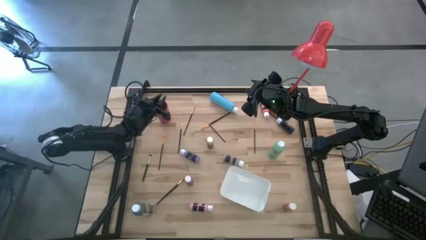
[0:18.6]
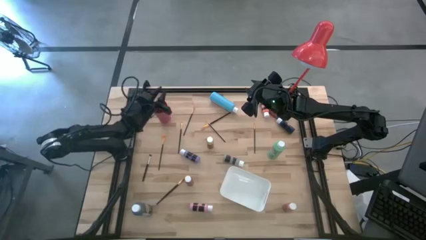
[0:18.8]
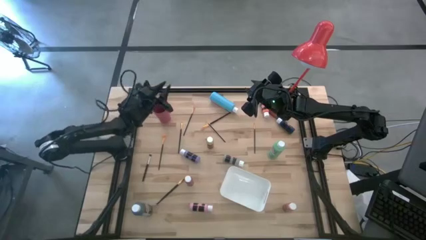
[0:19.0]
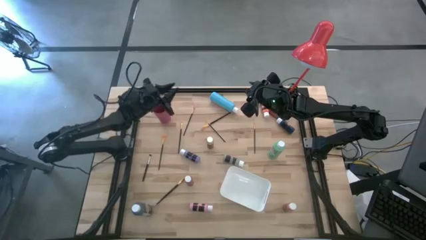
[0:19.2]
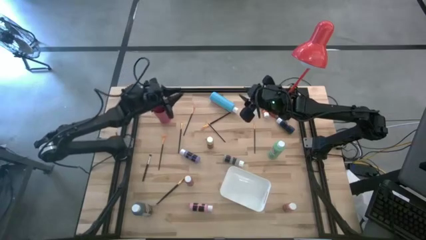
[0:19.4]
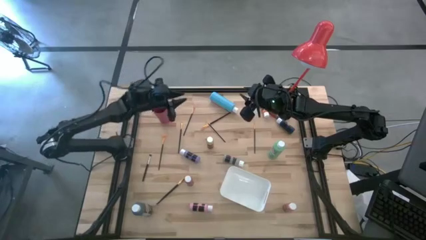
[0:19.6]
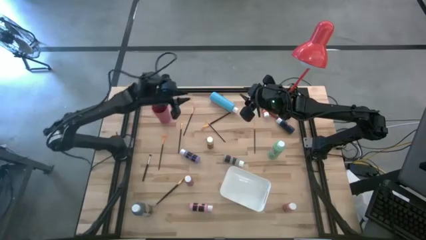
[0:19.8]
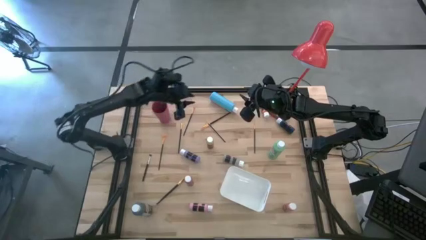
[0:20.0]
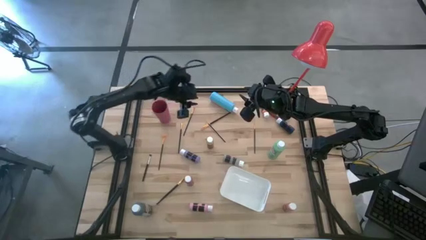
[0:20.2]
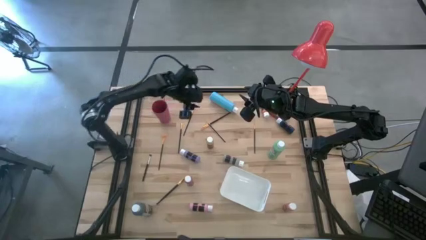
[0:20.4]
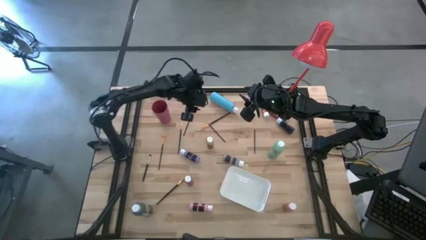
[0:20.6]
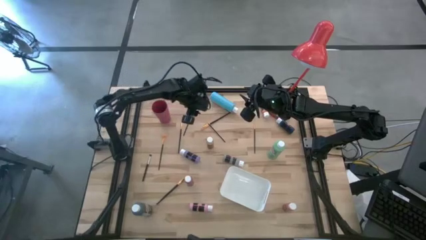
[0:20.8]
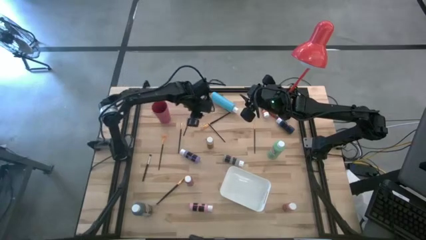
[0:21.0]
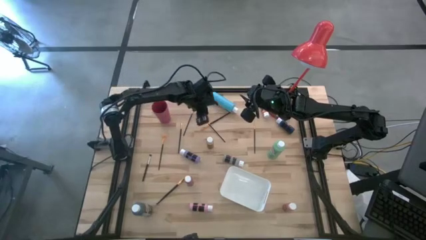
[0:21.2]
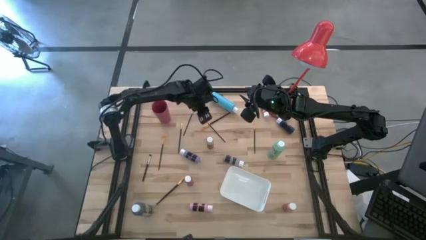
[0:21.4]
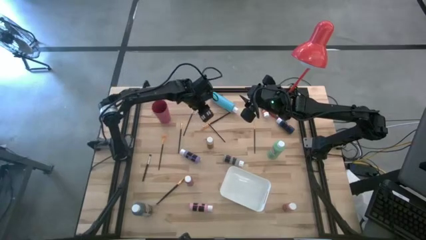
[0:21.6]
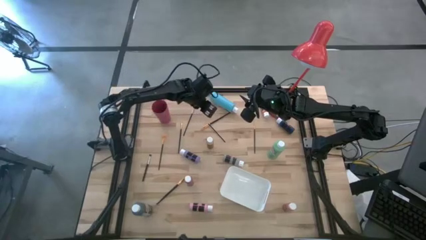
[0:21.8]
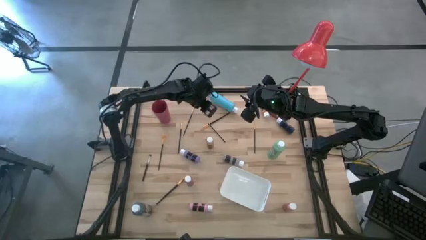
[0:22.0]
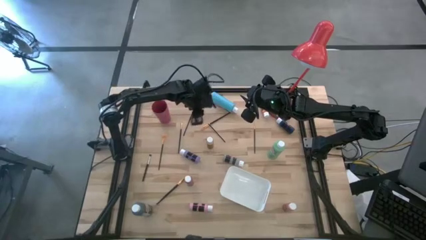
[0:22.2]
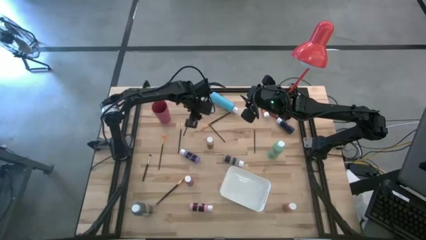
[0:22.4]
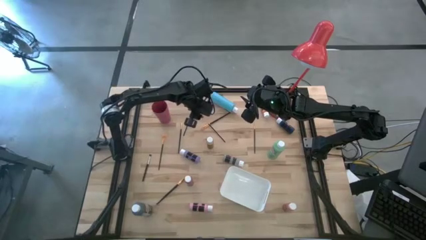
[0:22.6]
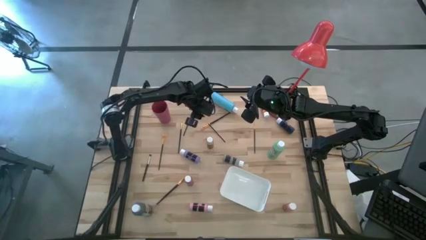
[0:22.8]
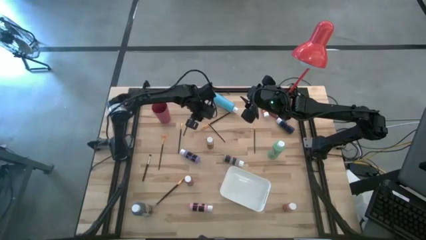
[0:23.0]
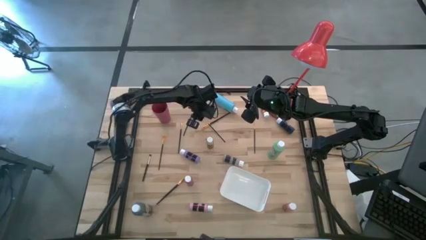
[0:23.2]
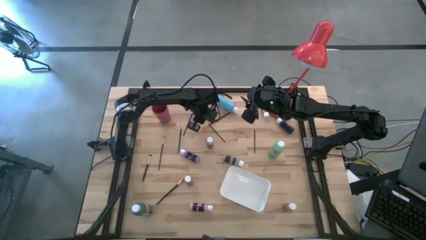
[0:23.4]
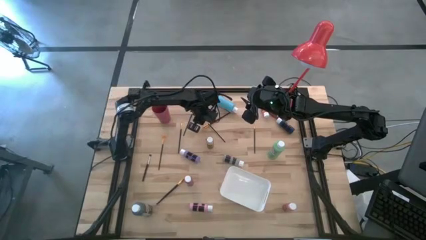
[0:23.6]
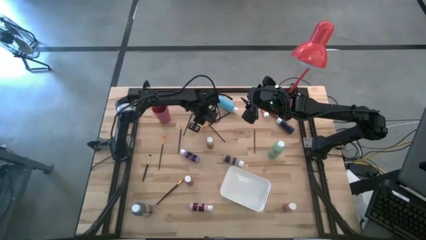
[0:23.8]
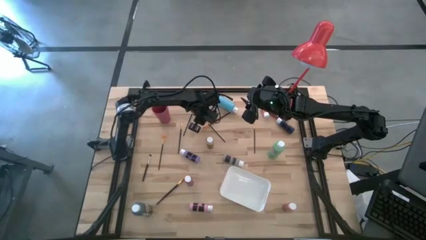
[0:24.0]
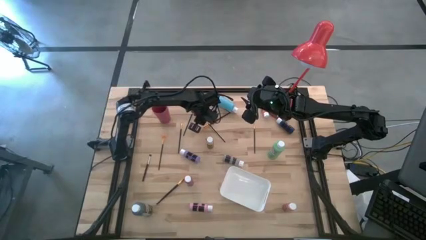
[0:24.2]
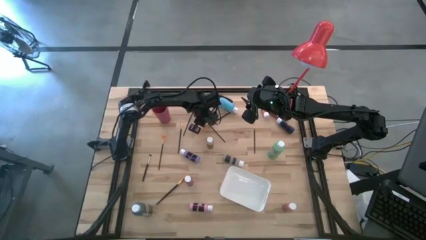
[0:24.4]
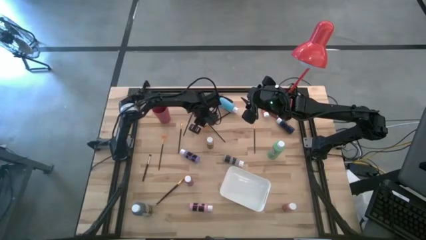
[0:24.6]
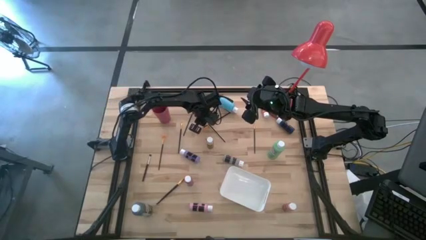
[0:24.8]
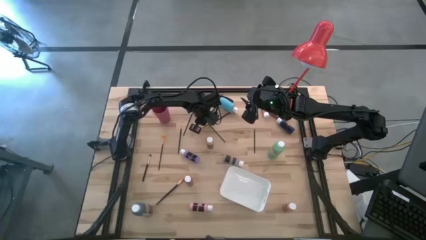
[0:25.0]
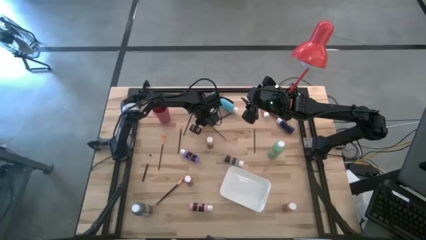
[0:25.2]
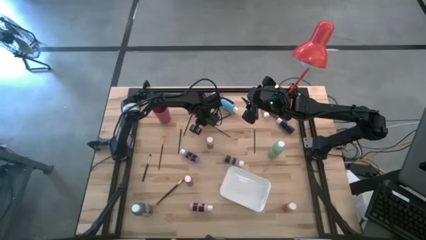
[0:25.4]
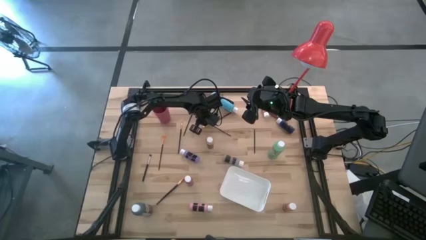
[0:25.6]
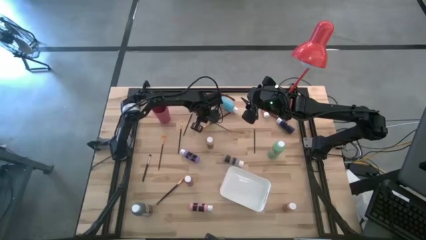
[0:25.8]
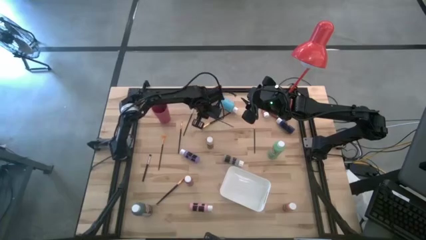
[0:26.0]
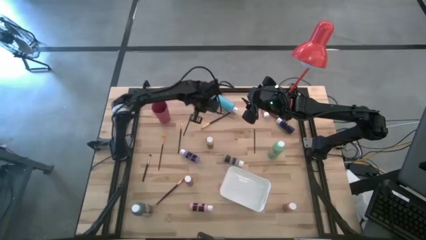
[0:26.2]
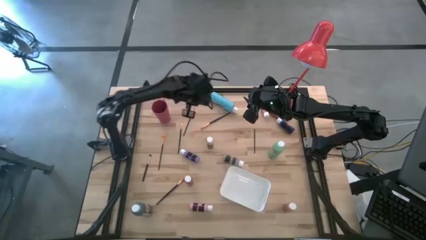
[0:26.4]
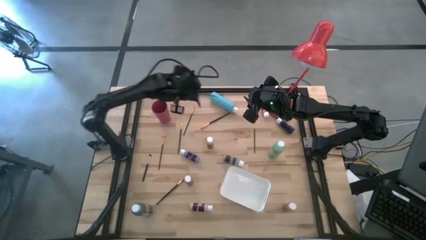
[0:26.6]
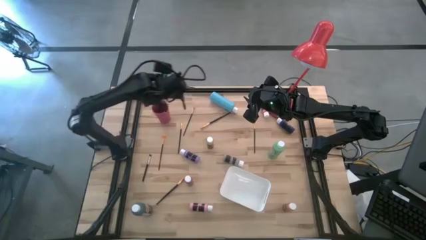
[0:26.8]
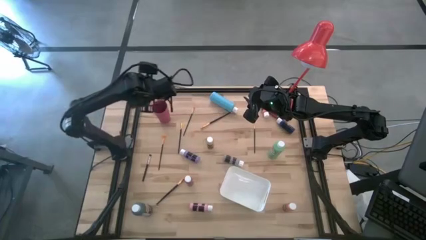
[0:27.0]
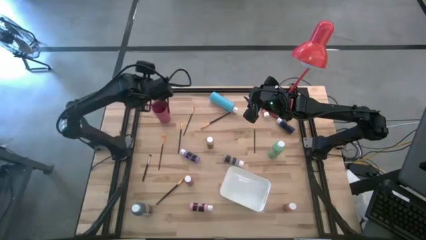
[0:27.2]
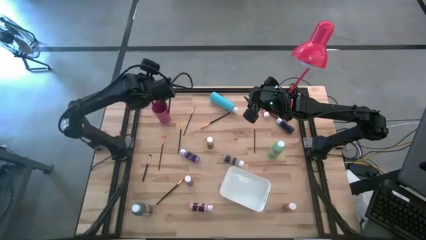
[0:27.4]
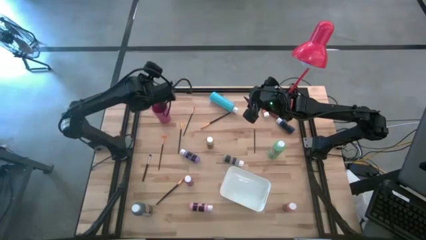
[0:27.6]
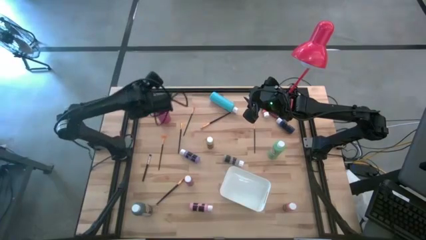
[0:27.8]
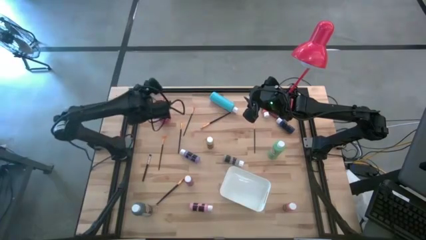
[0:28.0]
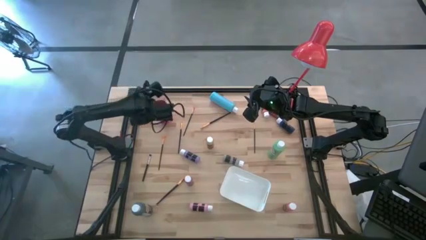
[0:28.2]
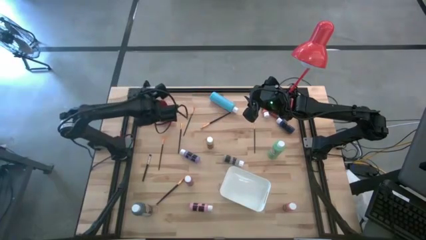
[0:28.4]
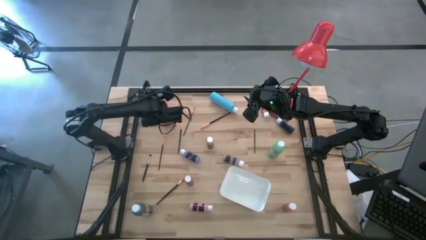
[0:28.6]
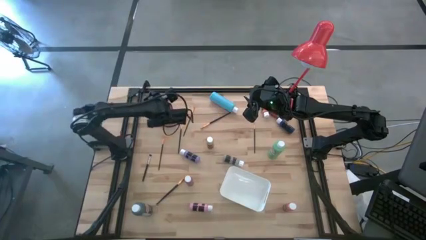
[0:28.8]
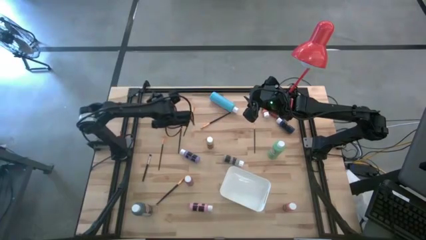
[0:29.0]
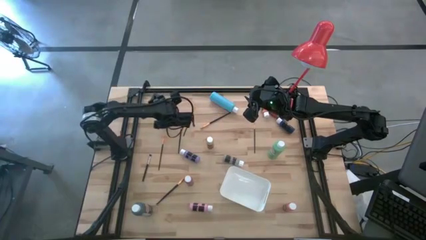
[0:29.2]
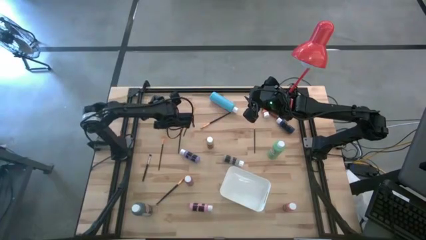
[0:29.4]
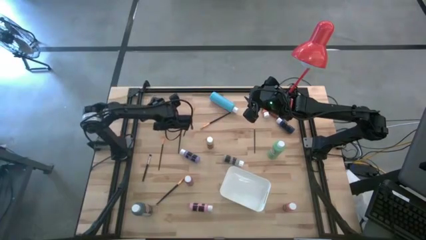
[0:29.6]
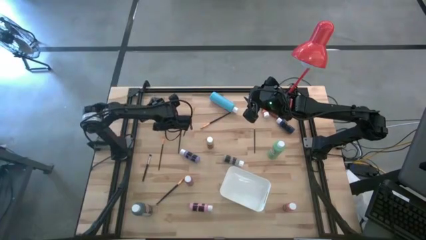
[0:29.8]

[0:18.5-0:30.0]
Task: Pick & Place Paint Supplies
Put the orange paintbrush into the pink cup
